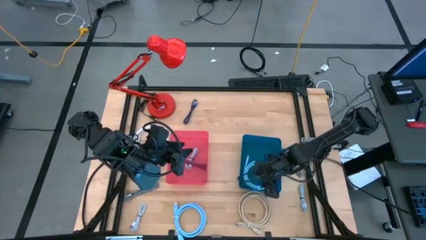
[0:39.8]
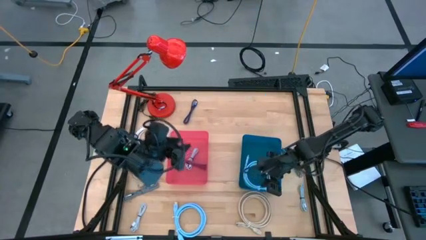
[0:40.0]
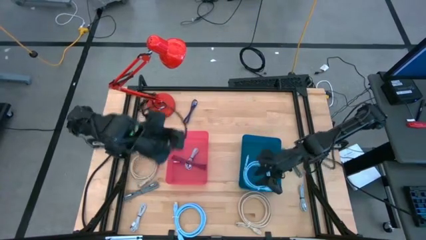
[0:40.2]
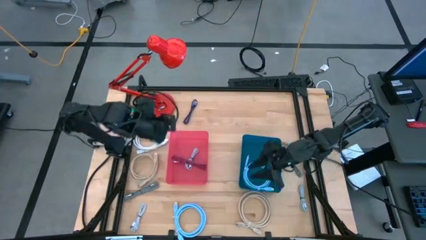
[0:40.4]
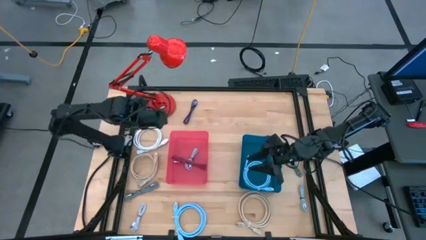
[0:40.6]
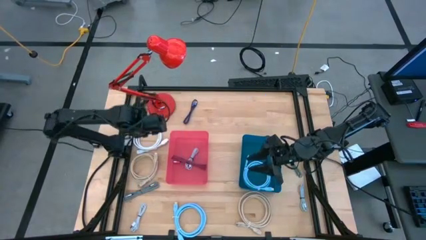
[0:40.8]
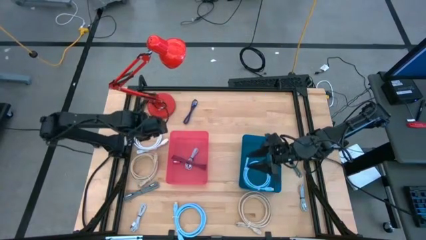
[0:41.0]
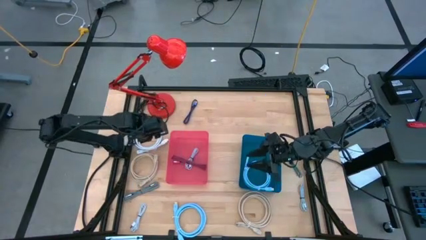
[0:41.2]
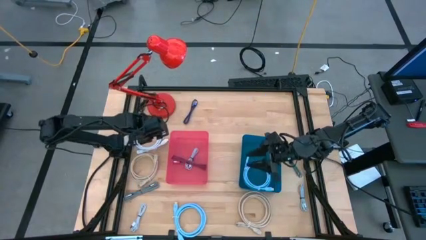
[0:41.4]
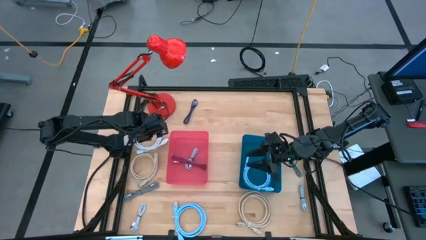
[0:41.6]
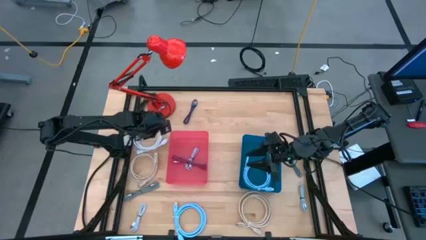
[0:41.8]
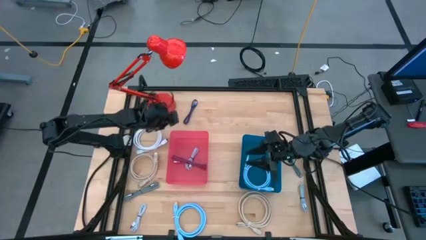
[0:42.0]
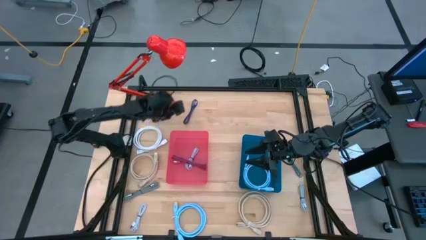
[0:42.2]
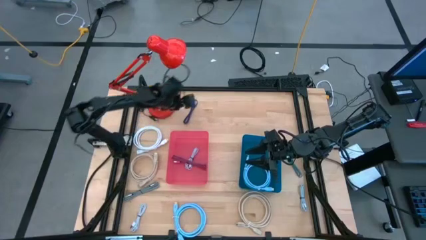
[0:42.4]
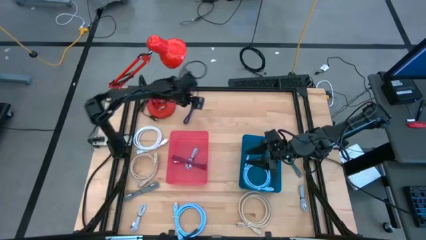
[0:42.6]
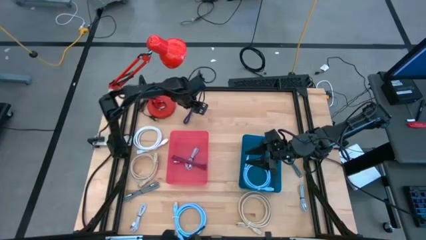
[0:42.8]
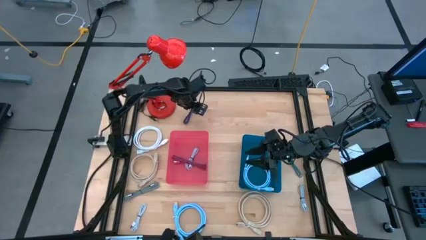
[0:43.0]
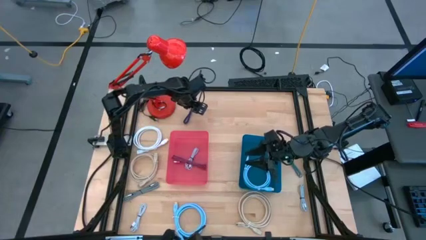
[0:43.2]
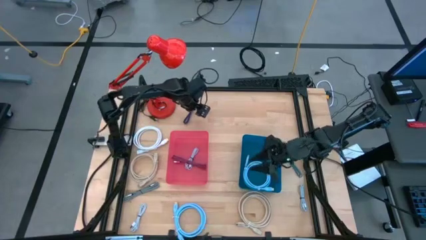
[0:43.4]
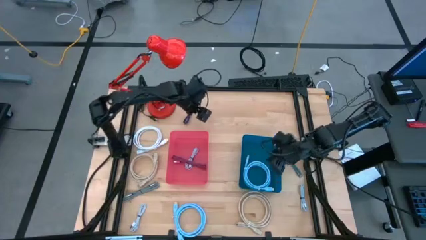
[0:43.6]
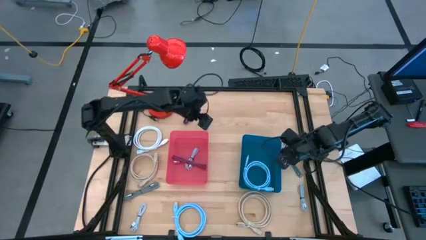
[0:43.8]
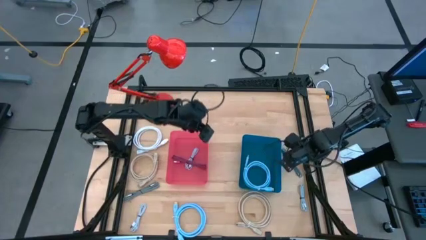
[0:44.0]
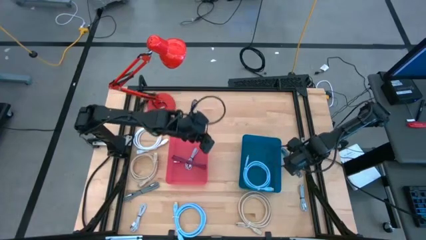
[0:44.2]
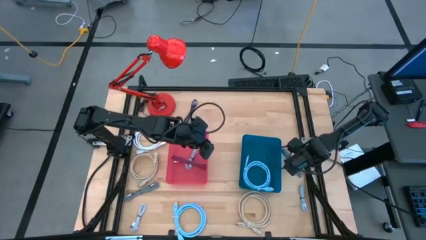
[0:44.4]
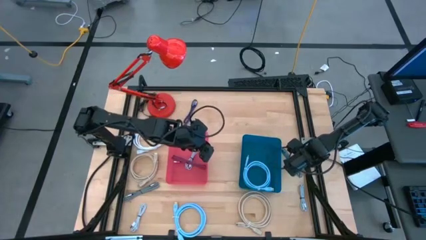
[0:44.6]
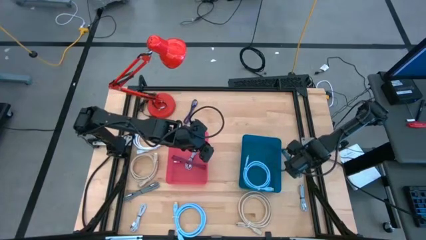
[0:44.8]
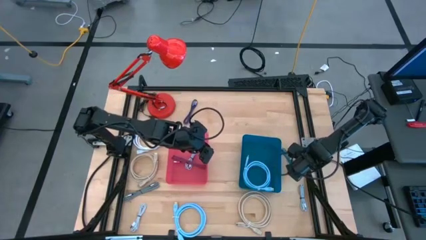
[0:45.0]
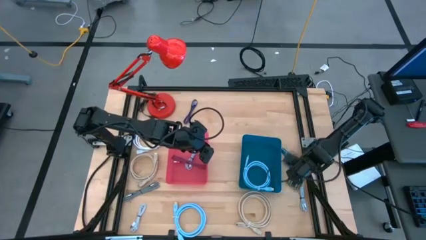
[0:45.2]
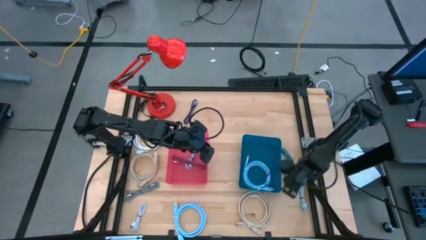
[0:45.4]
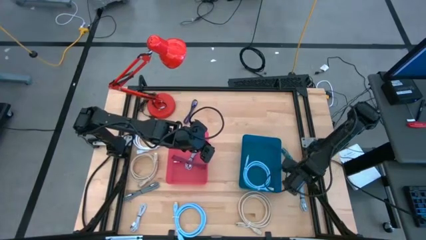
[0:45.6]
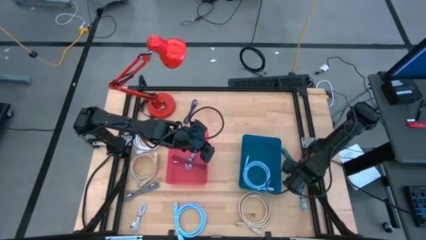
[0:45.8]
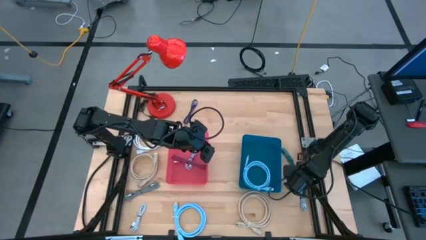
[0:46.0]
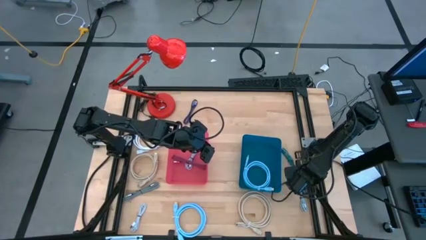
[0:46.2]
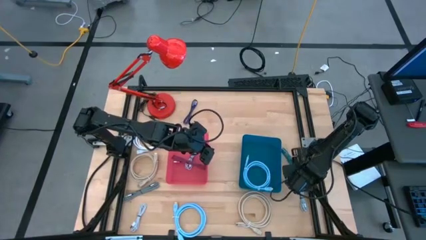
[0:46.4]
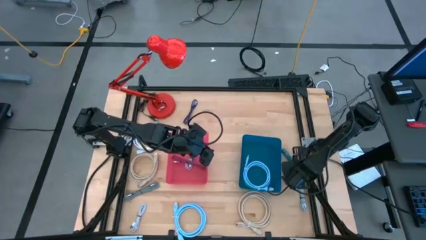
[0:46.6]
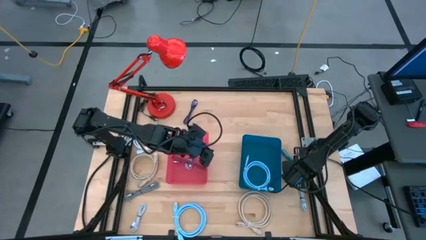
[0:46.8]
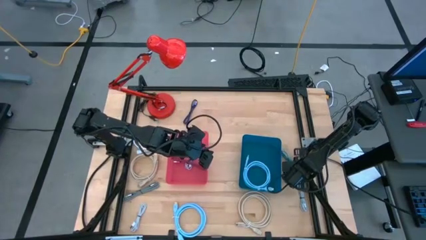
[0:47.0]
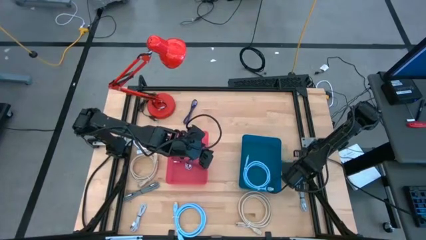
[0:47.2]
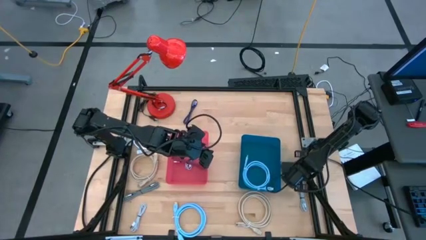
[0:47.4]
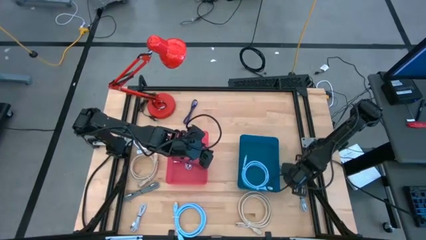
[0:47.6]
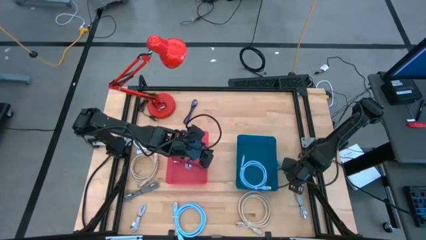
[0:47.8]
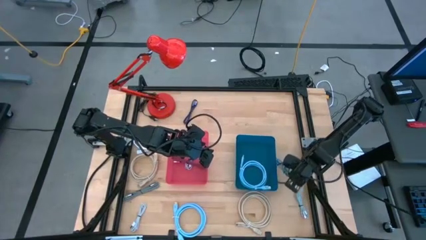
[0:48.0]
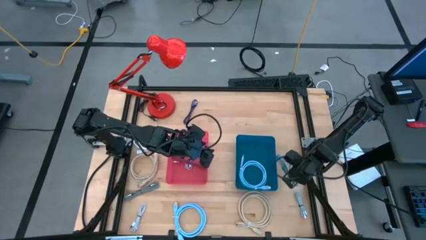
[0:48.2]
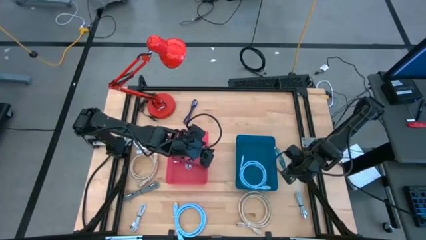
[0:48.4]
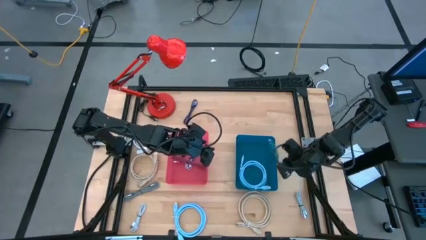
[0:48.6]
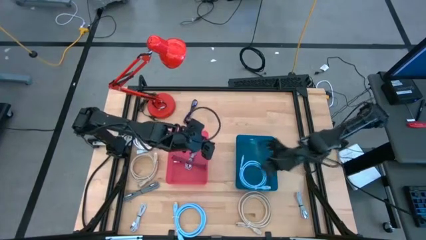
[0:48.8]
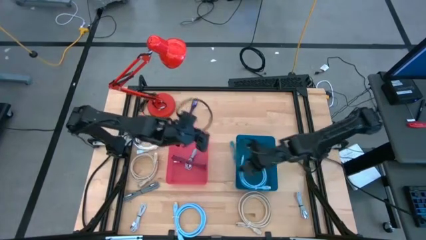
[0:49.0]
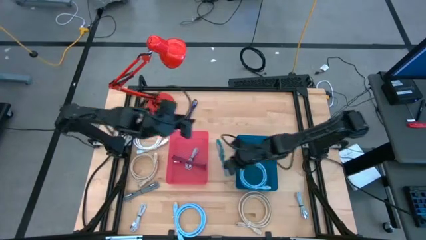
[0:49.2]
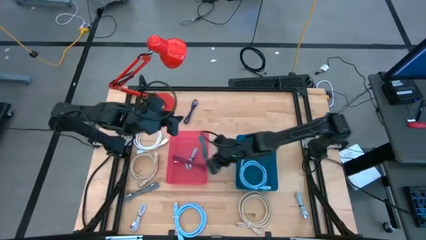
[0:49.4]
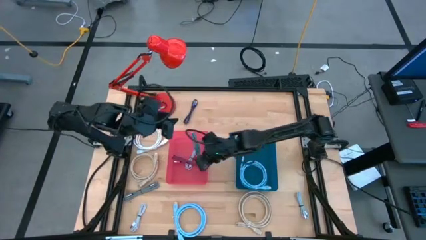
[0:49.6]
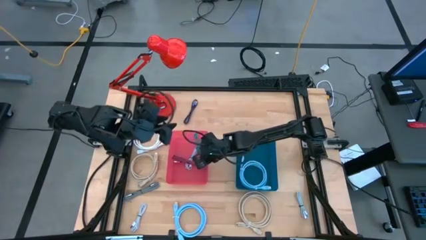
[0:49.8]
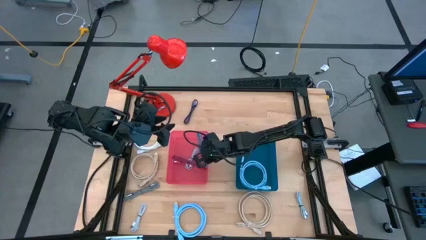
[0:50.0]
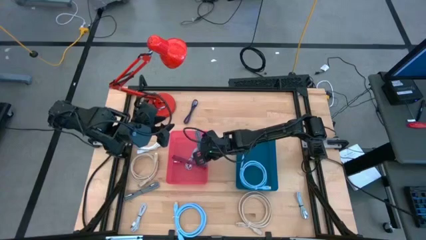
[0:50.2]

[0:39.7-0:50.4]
Task: Pick & Place USB Port
Put the black and blue charger cable into the red bin

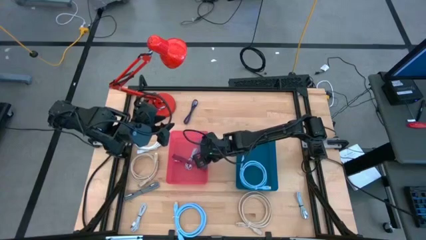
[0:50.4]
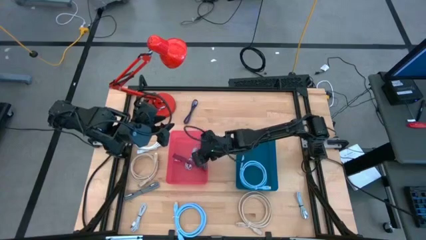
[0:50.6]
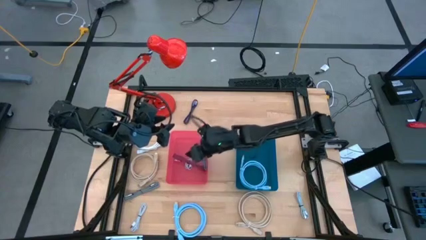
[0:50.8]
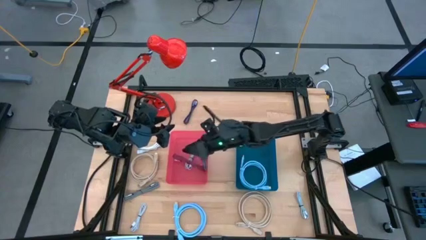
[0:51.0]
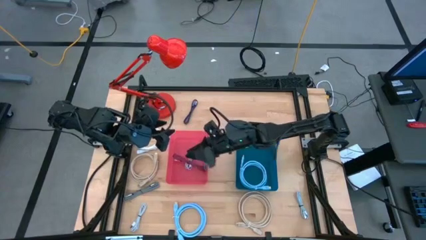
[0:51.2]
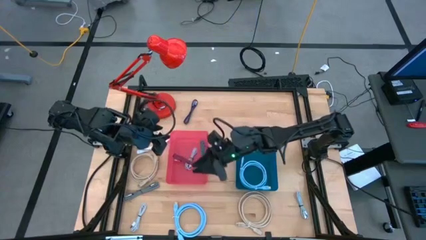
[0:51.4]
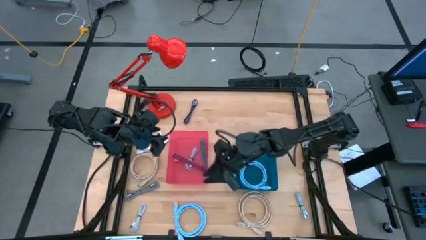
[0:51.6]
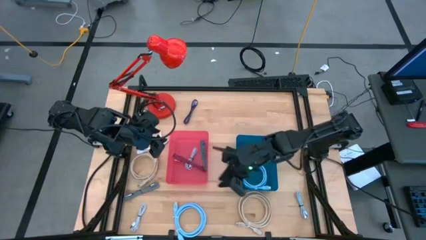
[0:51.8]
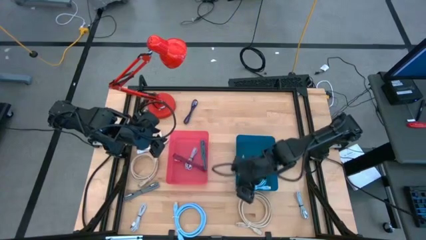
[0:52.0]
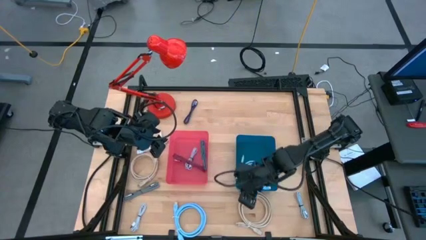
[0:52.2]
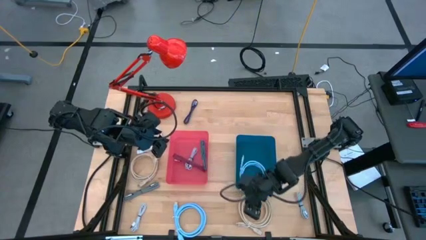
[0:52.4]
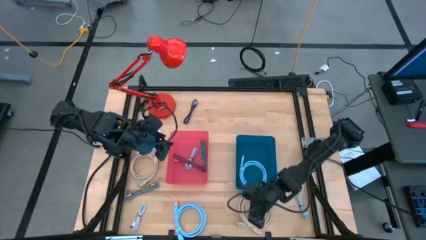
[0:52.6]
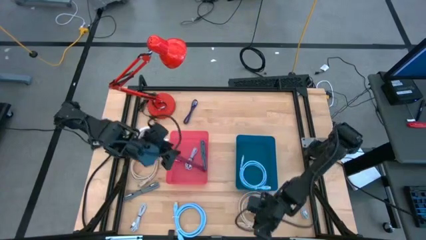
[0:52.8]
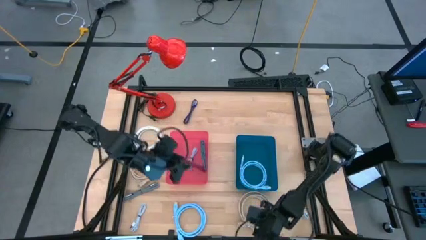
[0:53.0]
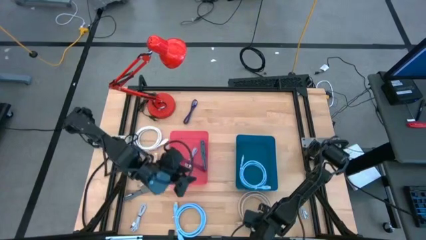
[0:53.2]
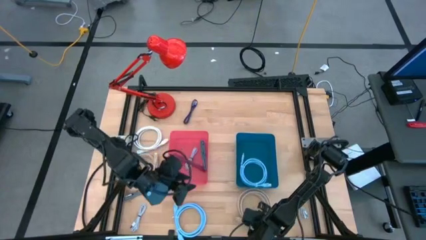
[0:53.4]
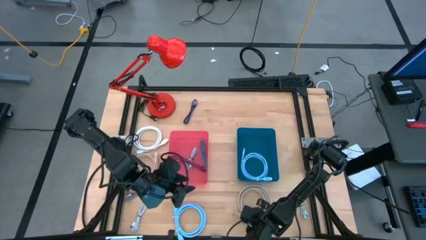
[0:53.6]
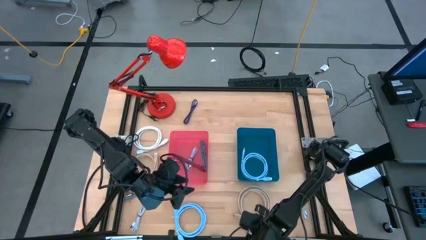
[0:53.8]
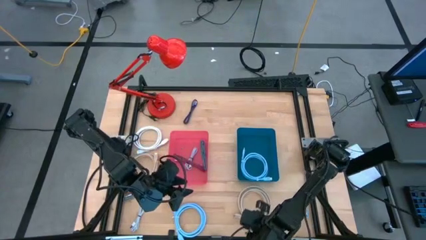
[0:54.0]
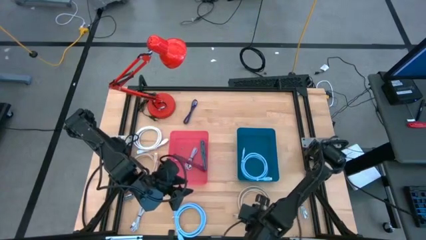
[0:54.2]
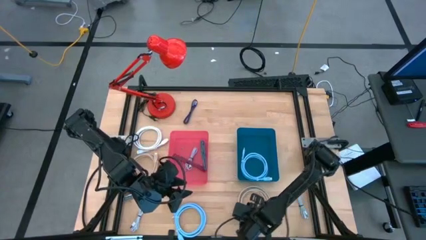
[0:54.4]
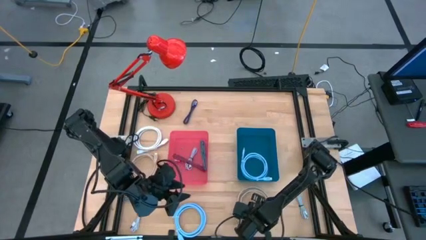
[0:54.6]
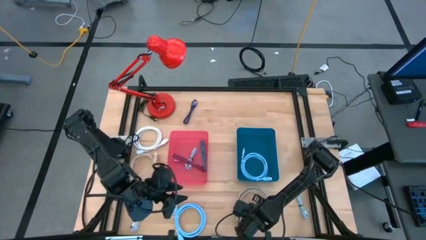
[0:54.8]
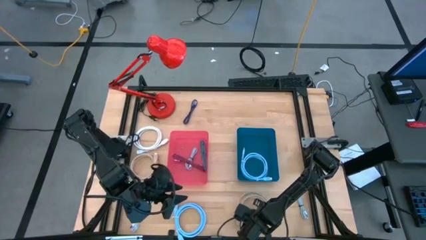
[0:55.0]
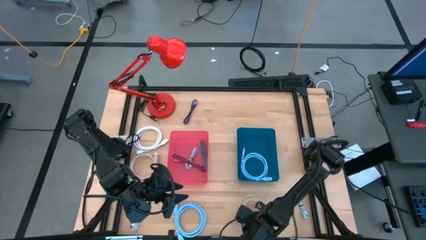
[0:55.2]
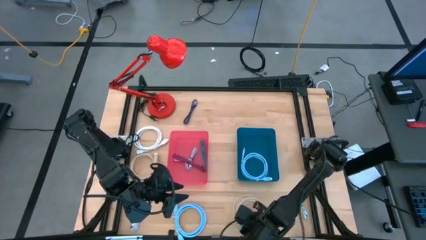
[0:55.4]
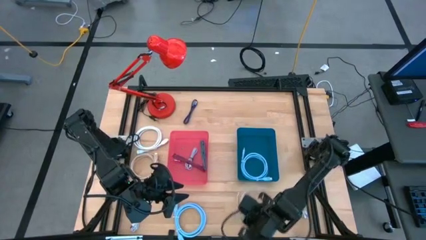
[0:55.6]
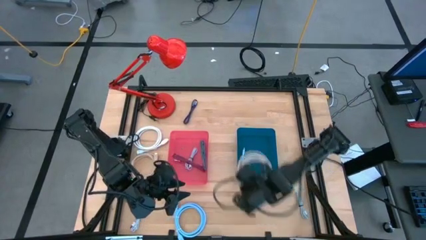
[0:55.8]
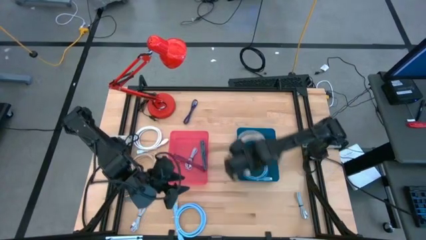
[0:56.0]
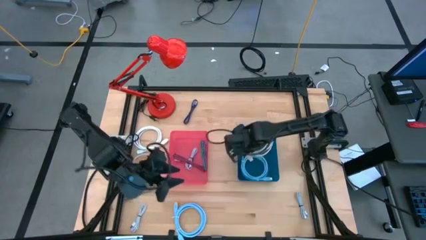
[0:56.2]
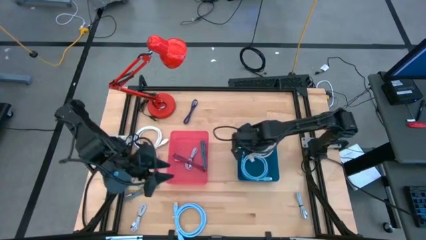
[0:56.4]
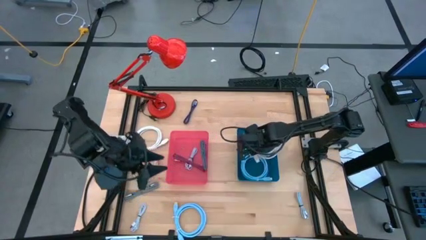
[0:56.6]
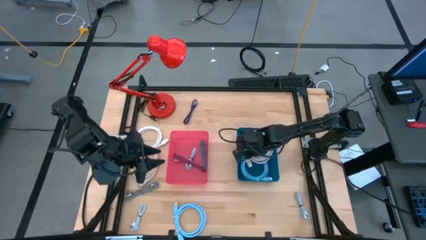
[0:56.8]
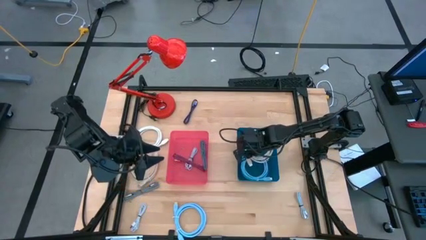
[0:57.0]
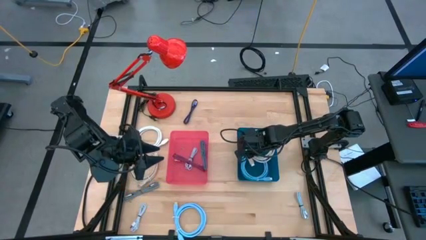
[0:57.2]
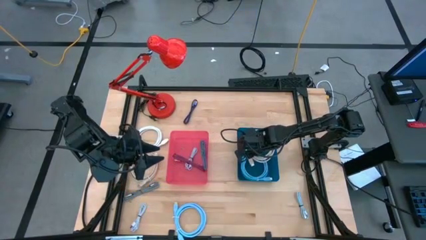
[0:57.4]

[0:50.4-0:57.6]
Put the bottom light brown HDMI cable into the blue bin
